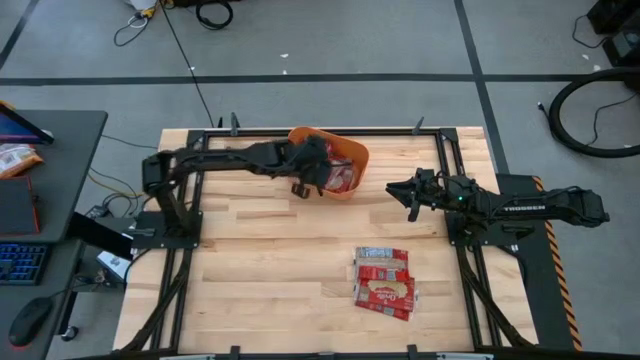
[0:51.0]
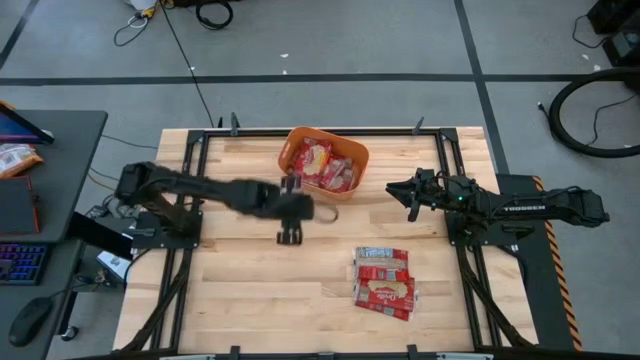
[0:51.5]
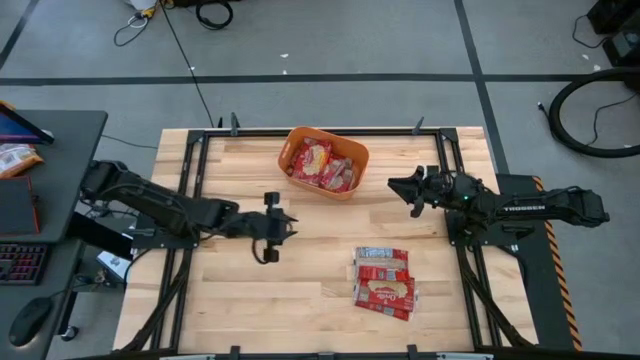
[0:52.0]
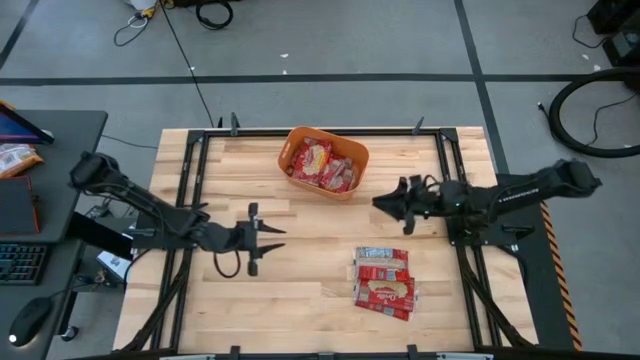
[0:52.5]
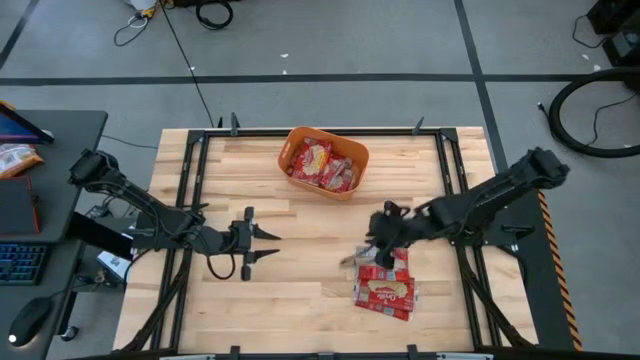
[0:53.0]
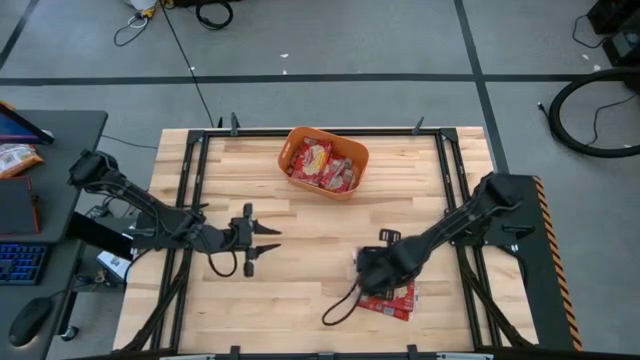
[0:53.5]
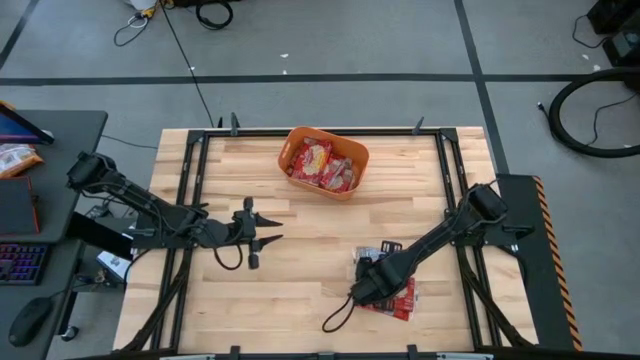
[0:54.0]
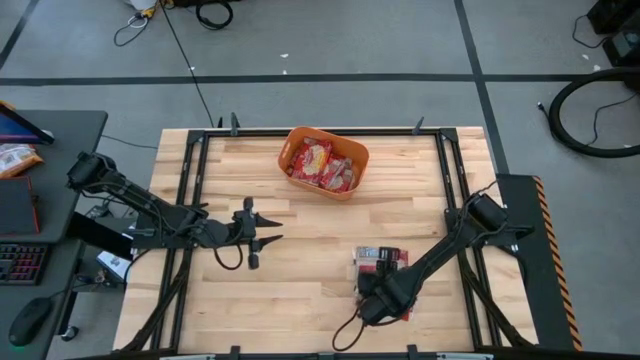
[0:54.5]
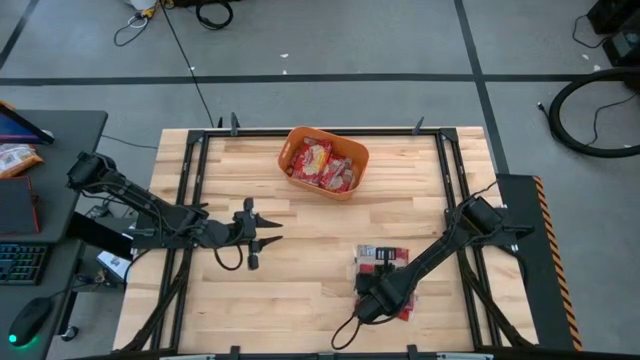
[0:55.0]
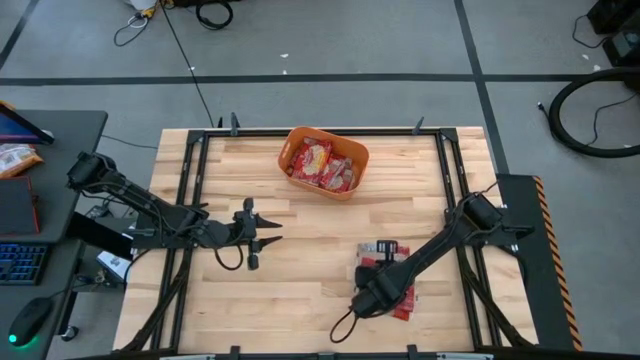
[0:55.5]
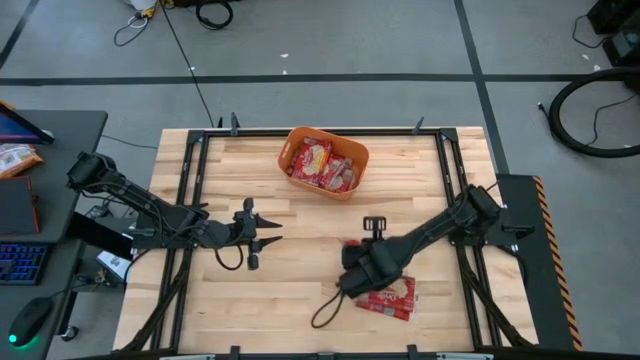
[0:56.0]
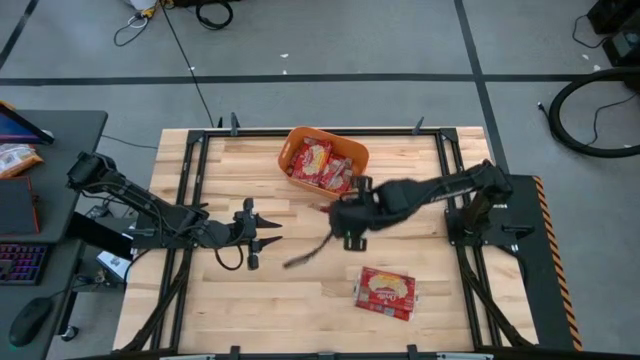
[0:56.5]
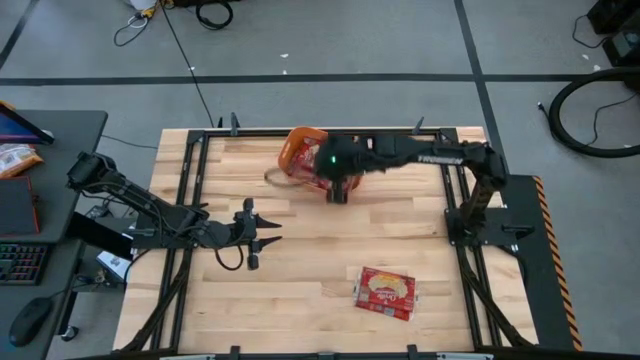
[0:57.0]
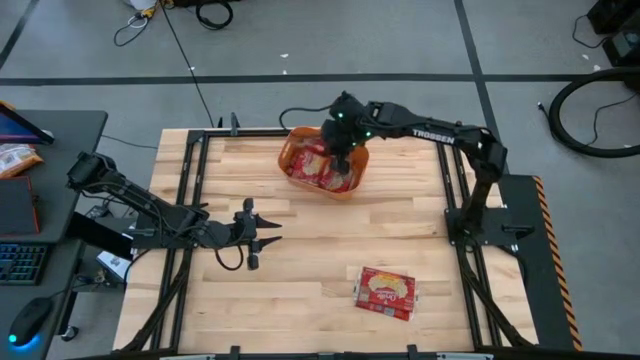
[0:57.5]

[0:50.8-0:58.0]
Task: Sort popcorn bags into baskets
Put the red popcorn bag into the orange bin

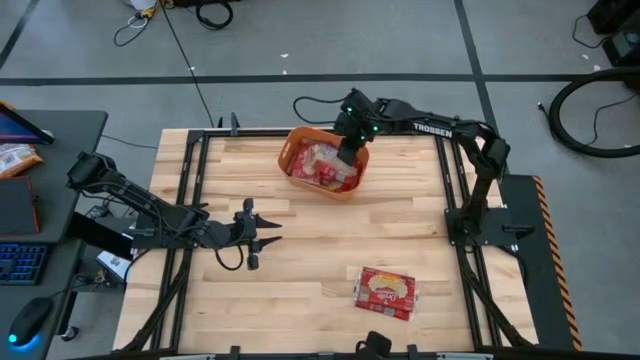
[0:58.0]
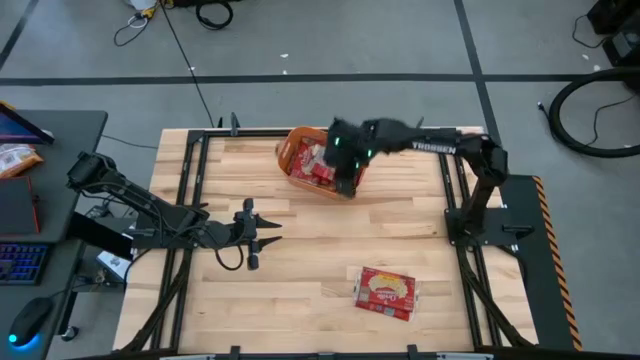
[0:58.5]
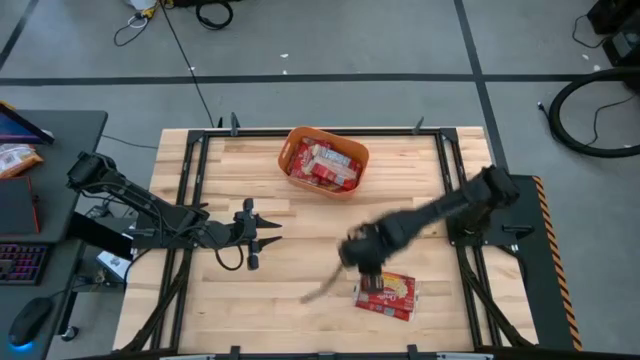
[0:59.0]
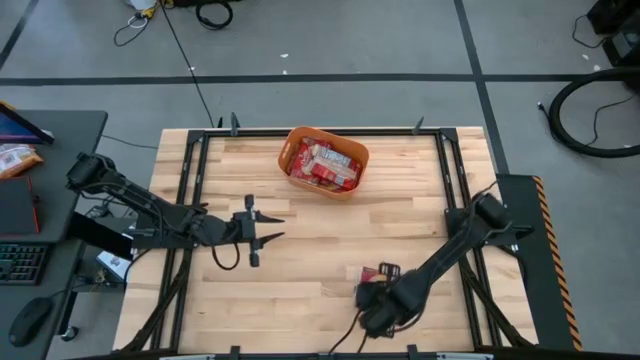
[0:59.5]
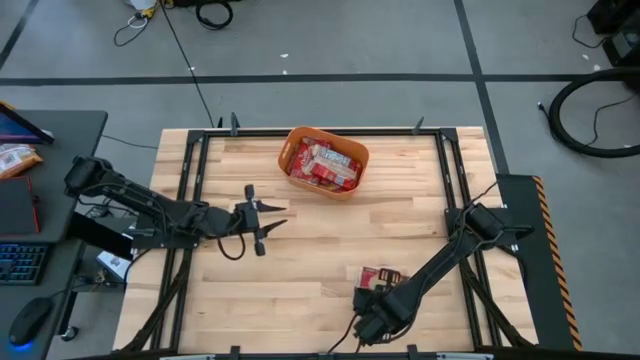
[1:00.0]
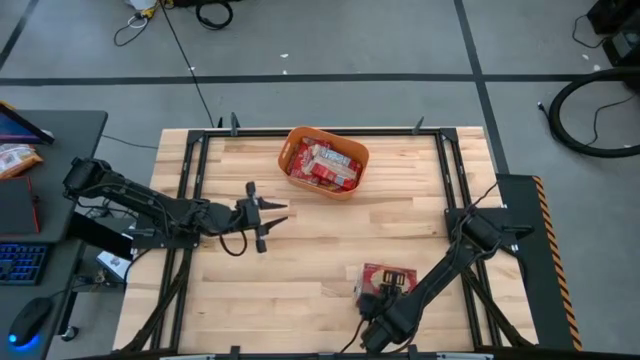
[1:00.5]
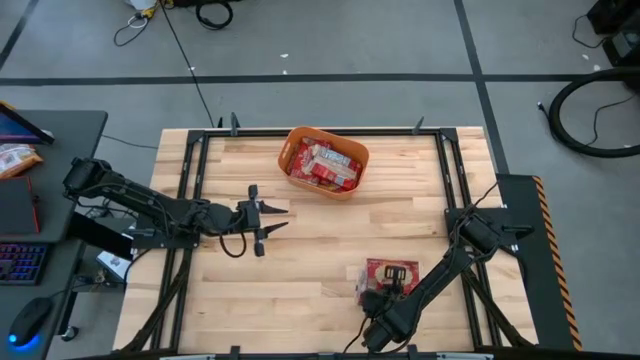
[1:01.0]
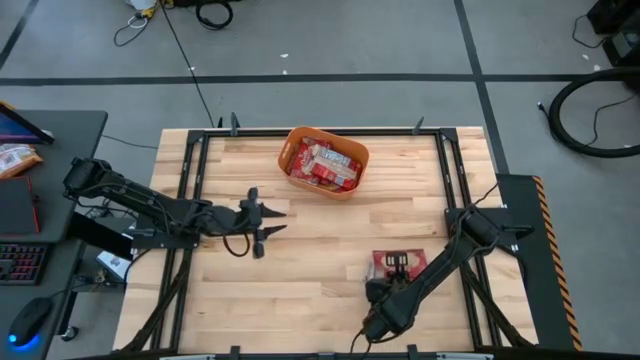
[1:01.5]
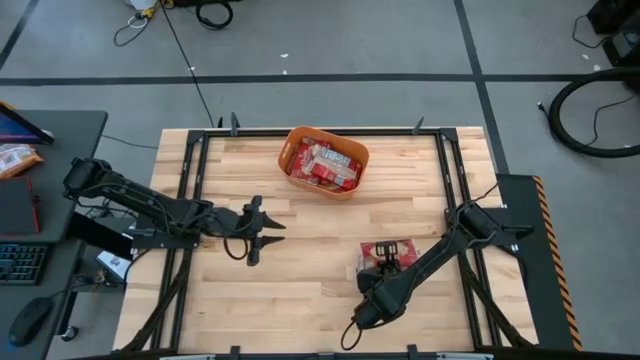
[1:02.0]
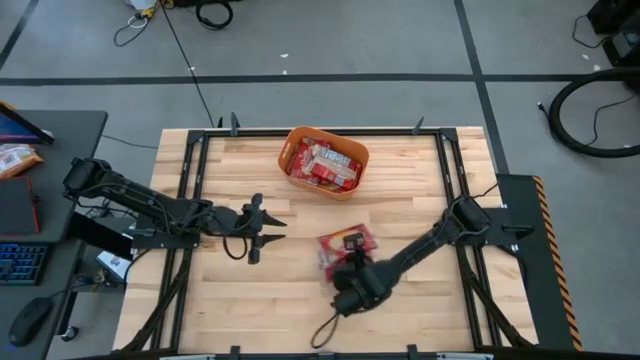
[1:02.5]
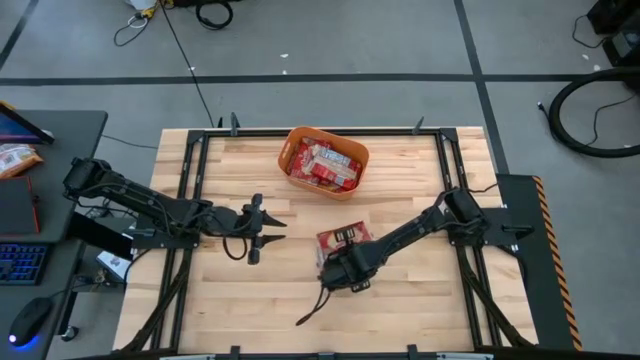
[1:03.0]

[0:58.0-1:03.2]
Put the red popcorn bag into the orange bin

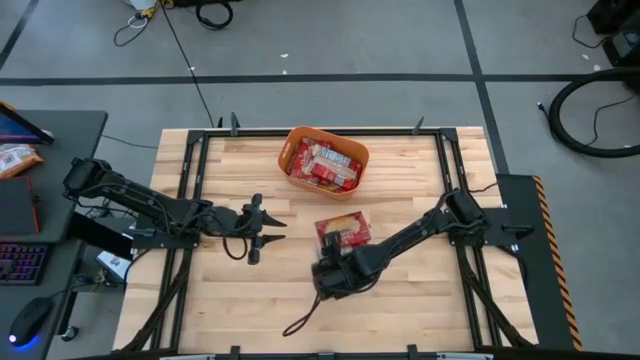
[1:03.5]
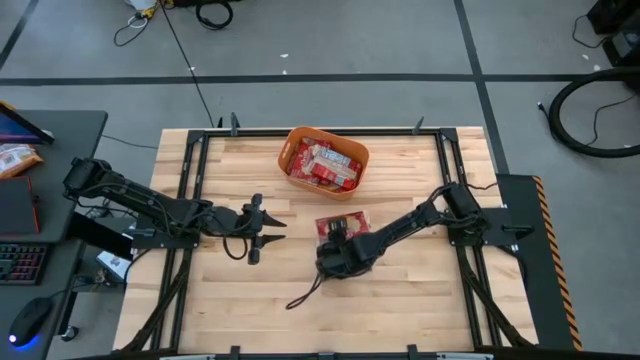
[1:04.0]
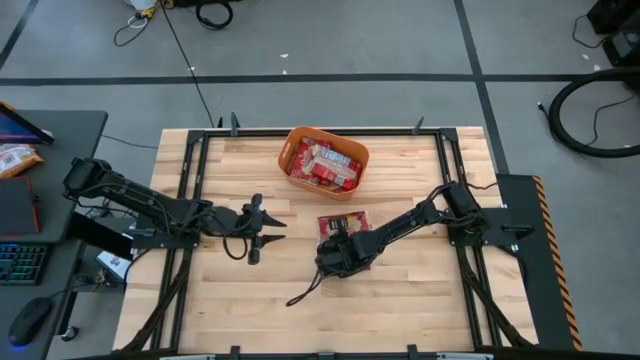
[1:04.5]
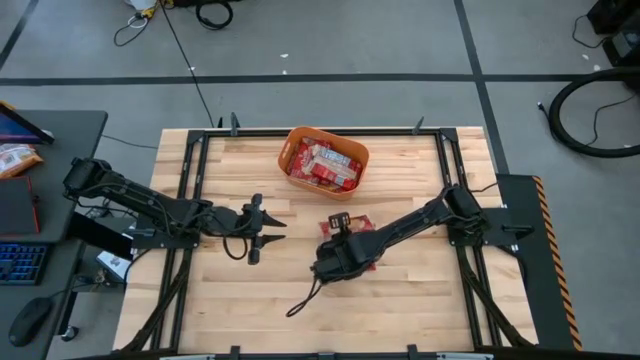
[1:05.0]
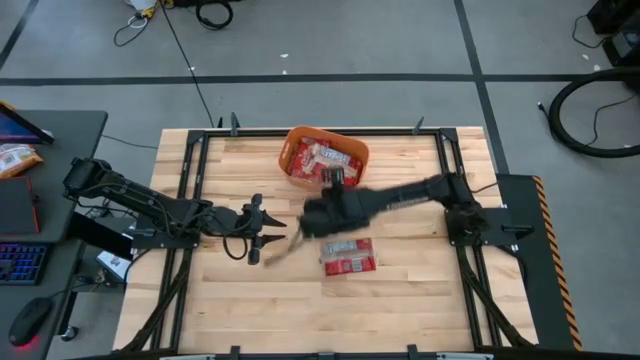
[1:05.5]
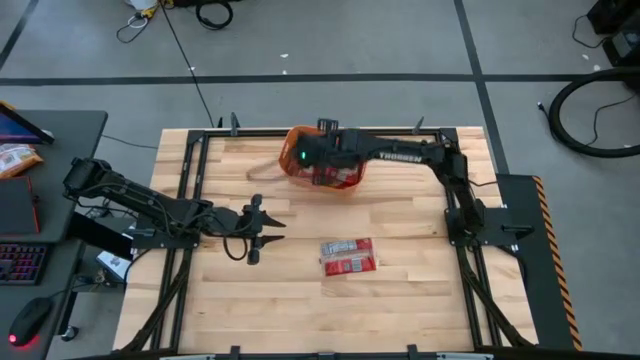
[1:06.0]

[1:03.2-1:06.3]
Put the red popcorn bag into the orange bin

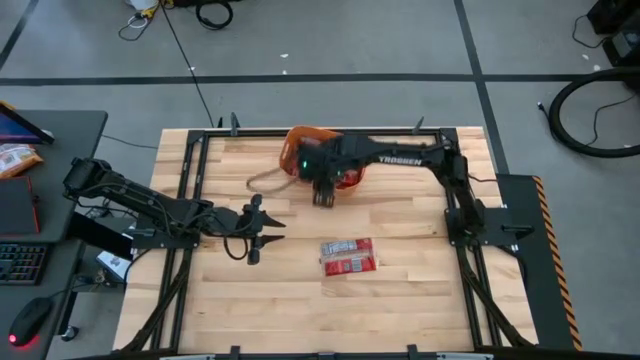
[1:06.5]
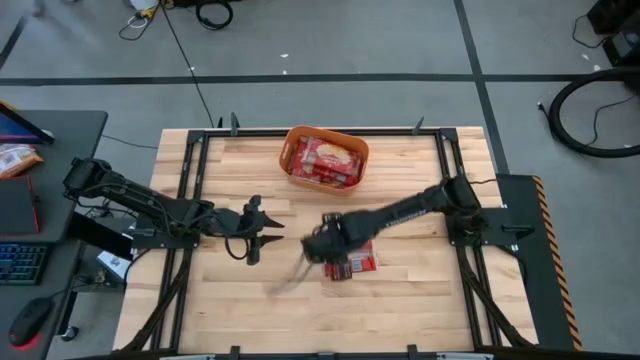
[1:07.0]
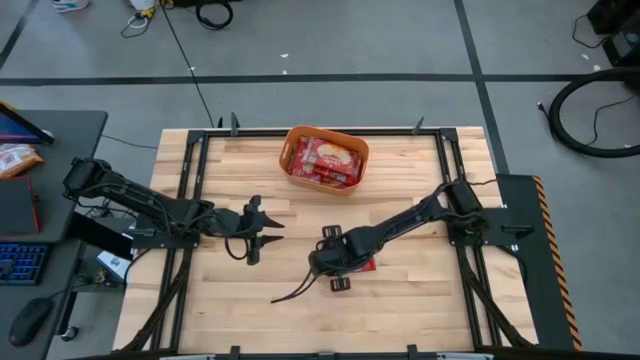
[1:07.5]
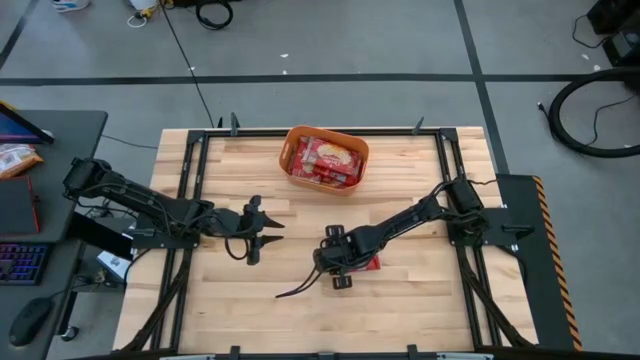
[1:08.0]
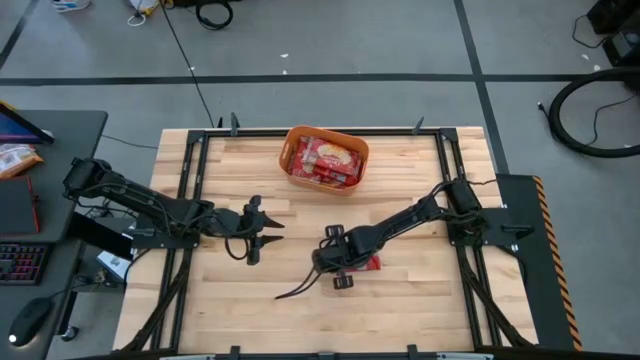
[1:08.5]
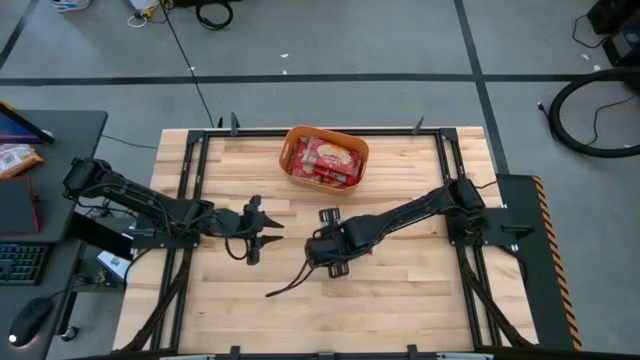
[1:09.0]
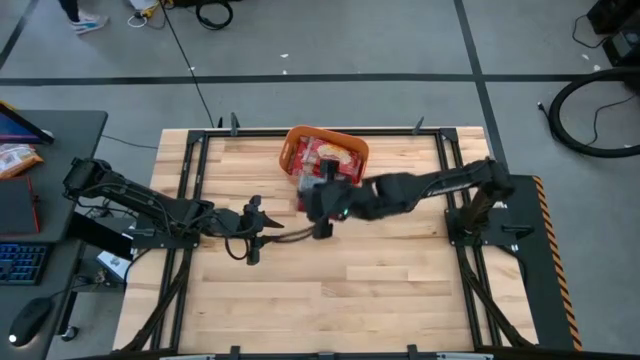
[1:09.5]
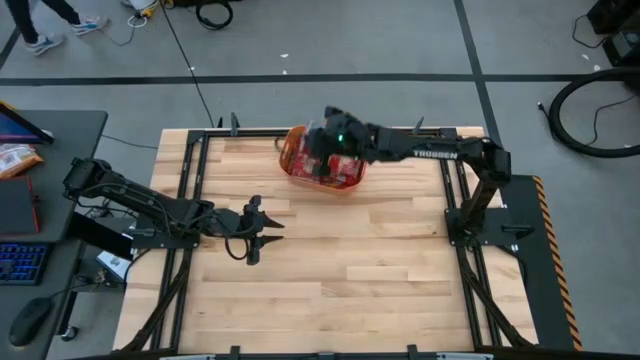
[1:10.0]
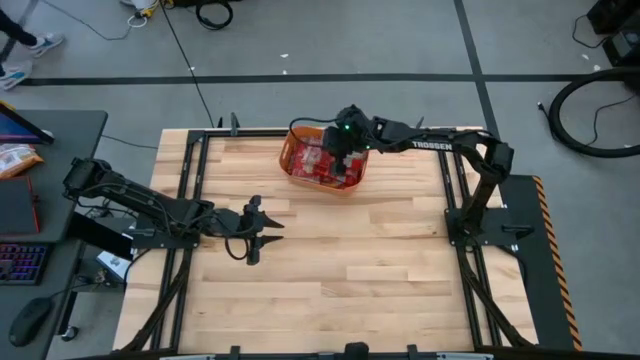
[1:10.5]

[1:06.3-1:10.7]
Put the red popcorn bag into the orange bin

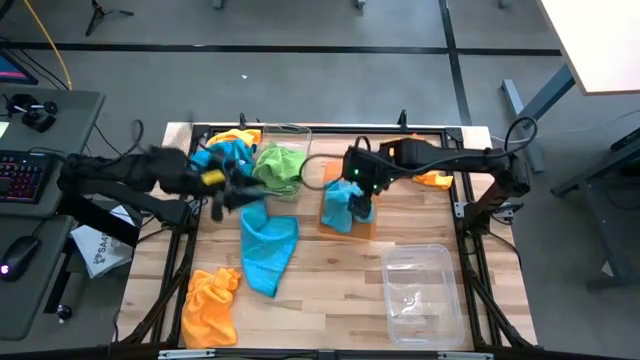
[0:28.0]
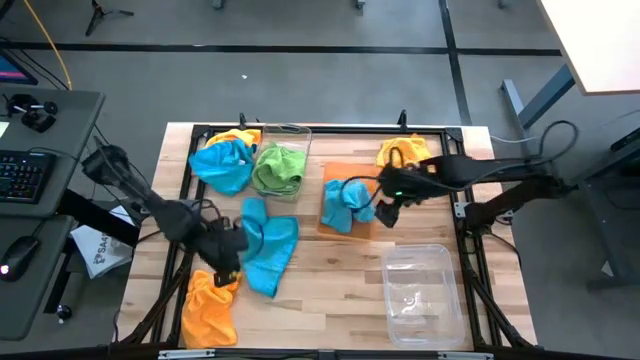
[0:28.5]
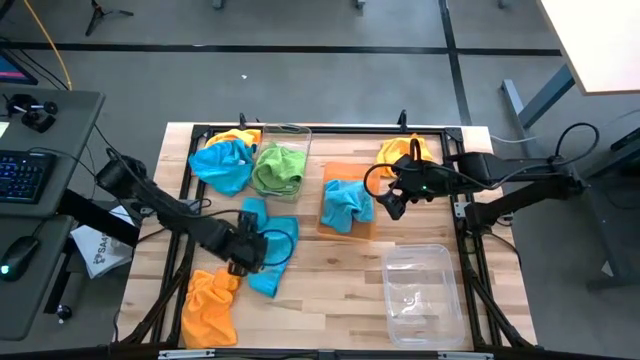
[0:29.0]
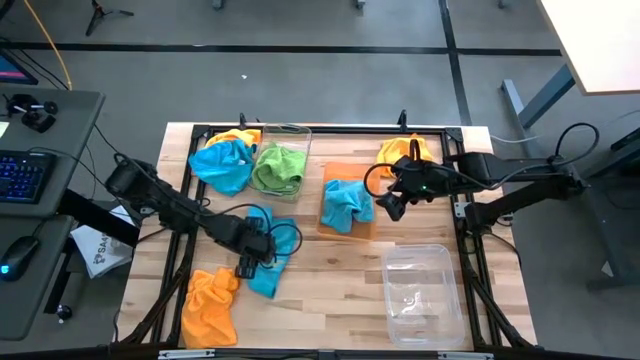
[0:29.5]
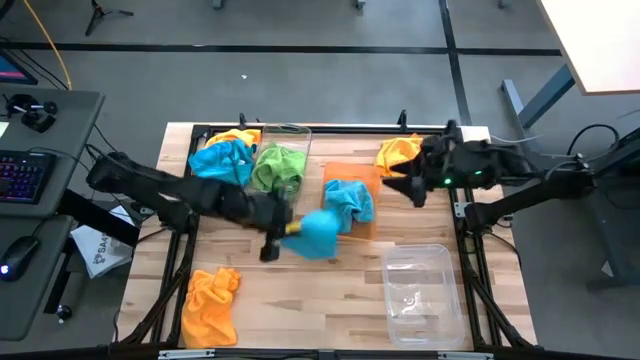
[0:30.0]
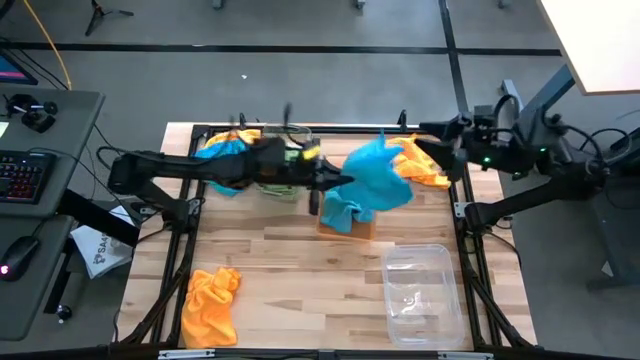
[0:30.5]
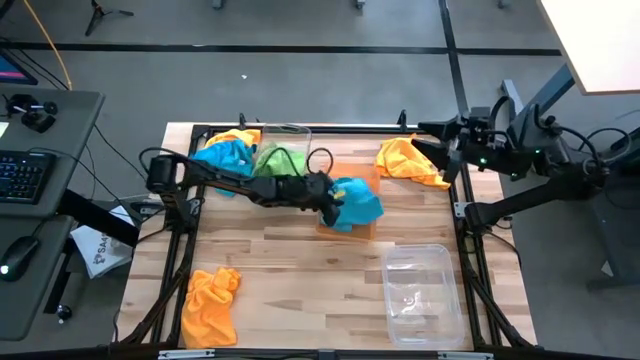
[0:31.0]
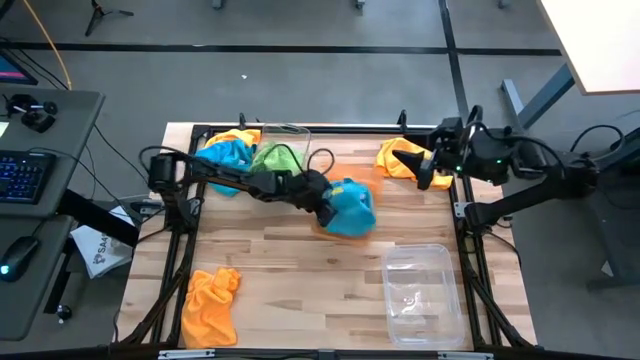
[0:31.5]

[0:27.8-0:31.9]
Task: Sort microfiber towel by color & place in baskets
Put the bottom blue microfiber cloth into the orange bin
